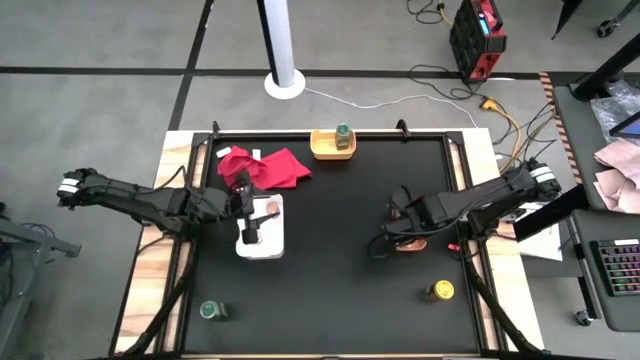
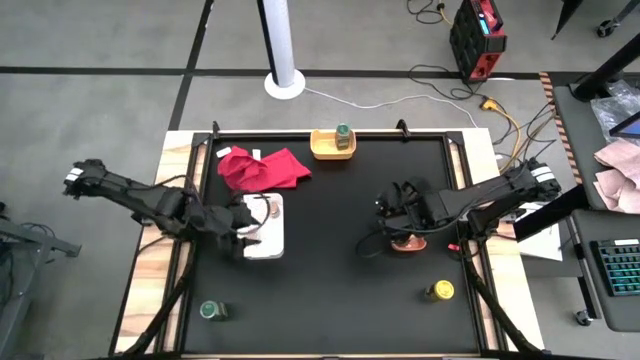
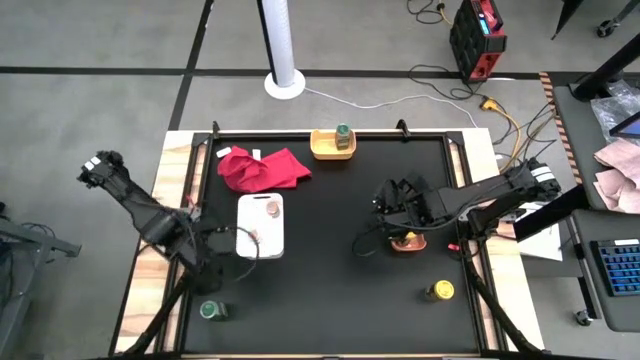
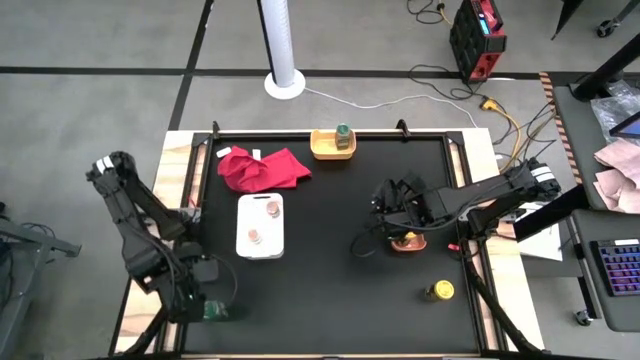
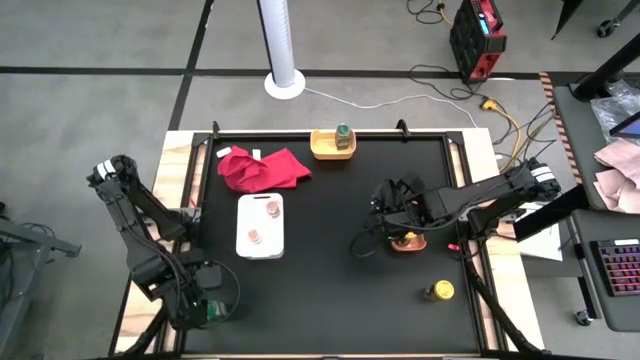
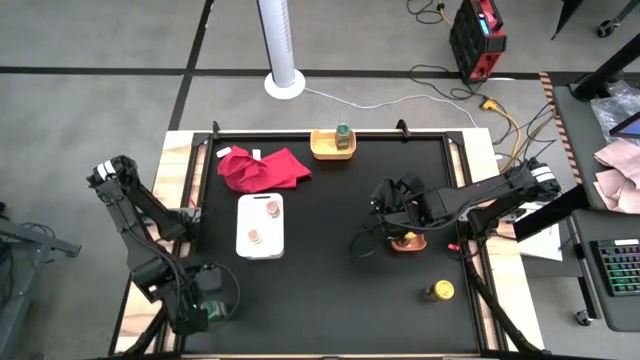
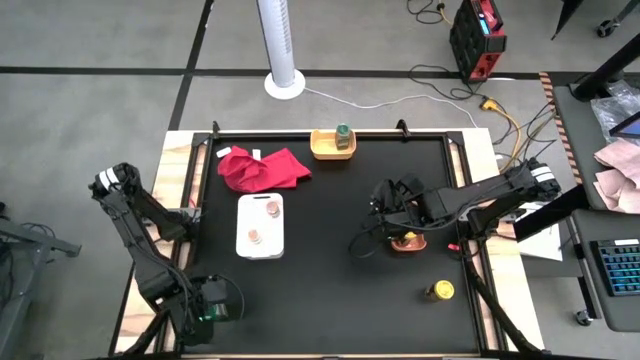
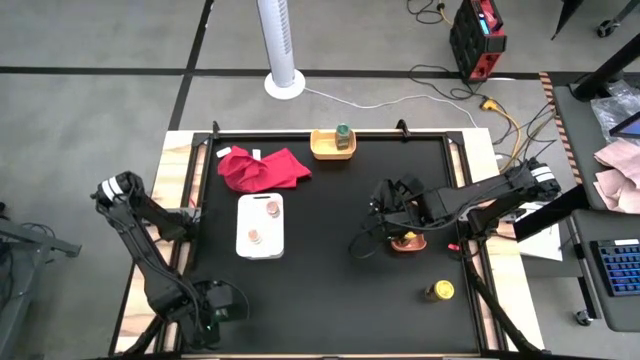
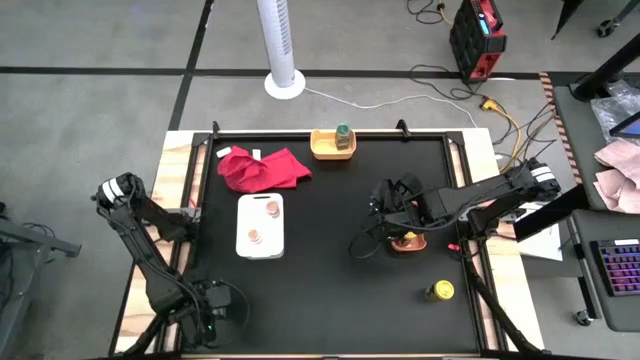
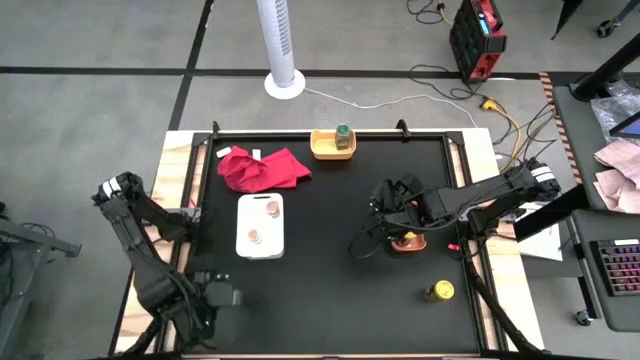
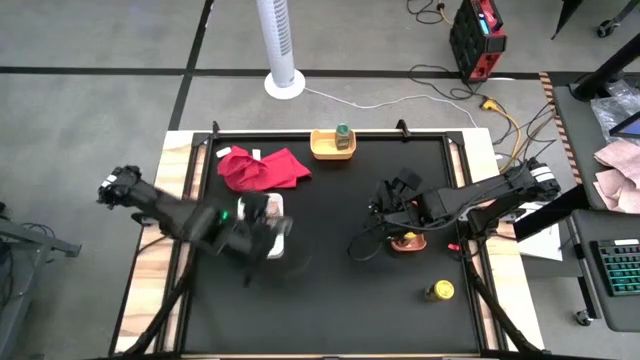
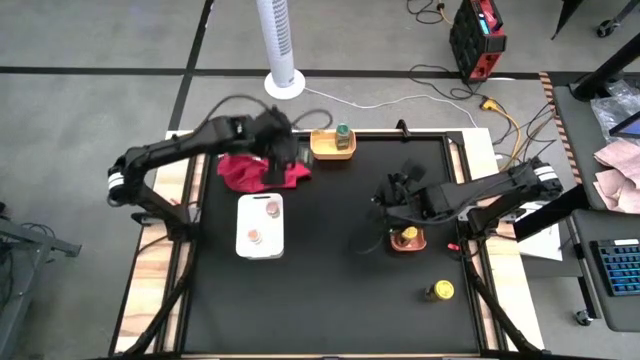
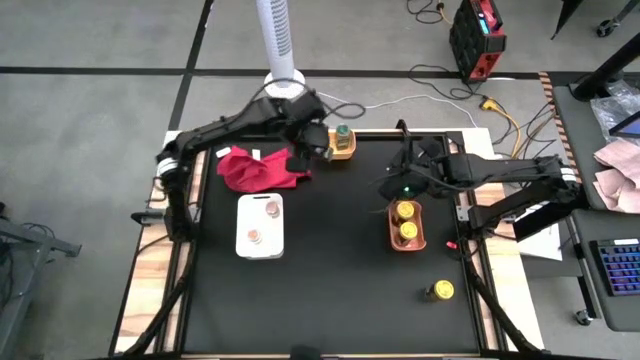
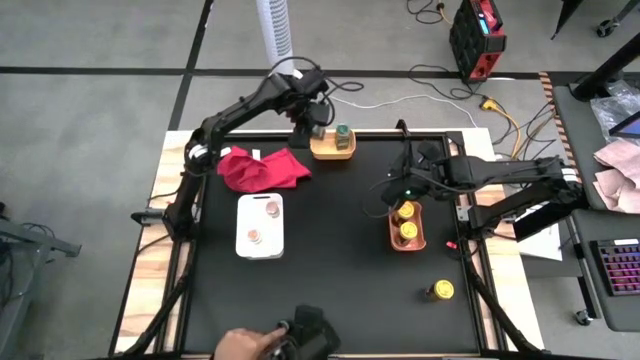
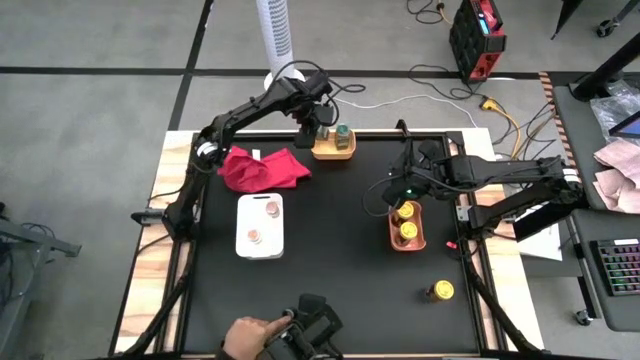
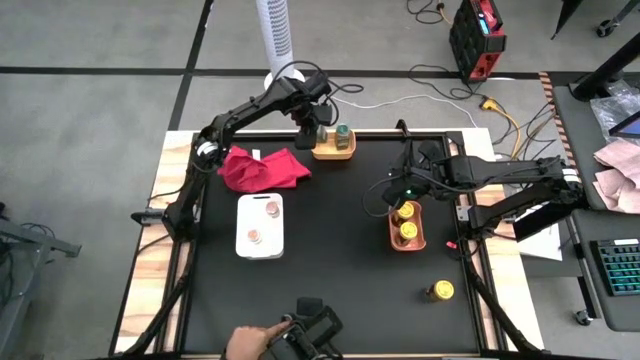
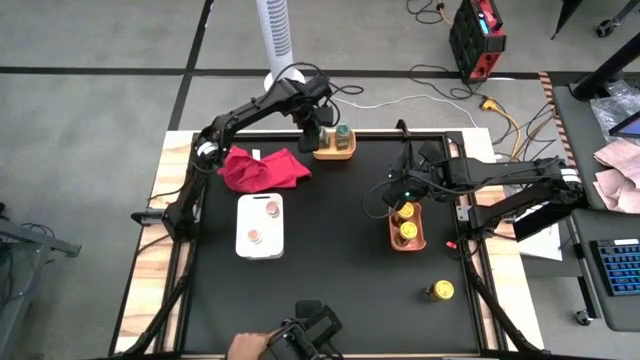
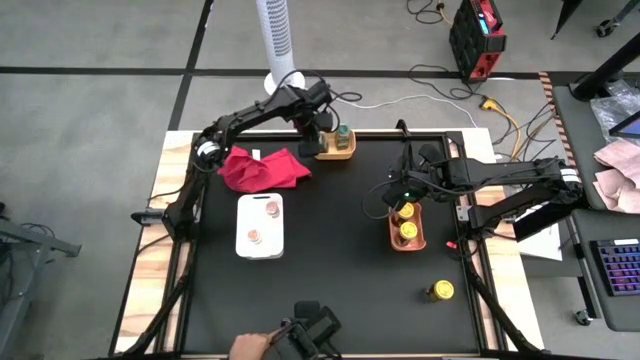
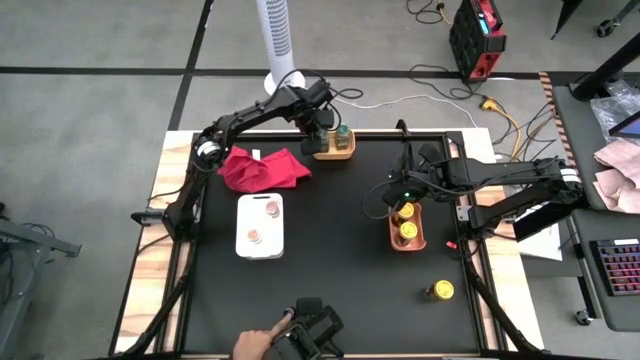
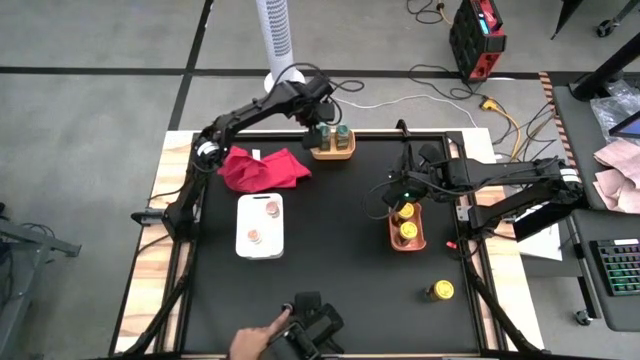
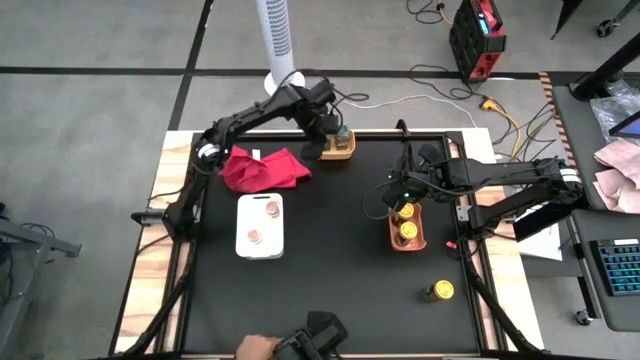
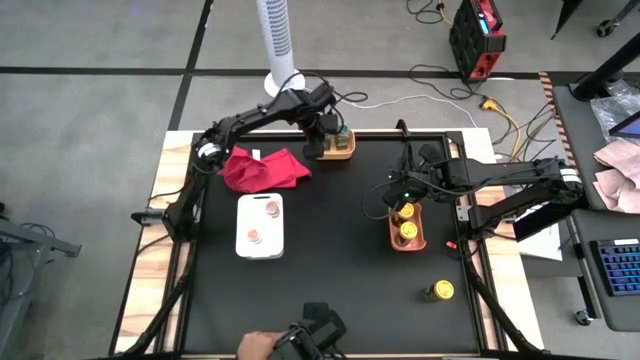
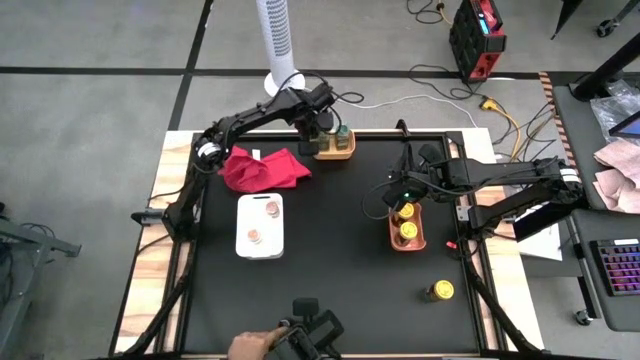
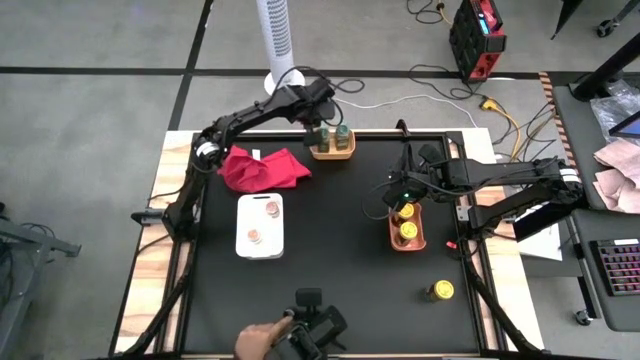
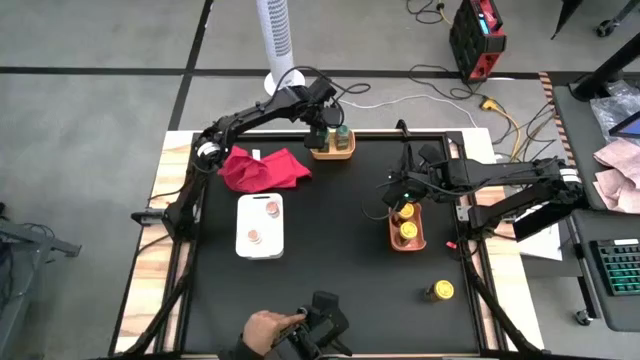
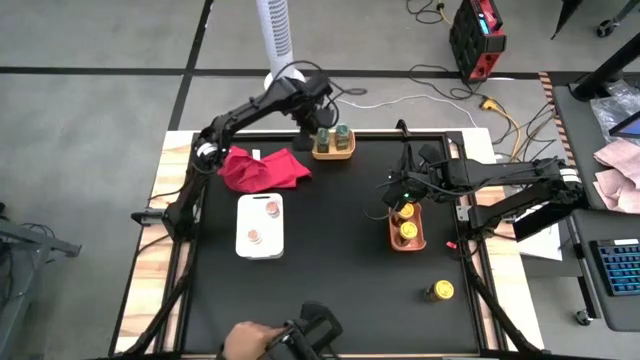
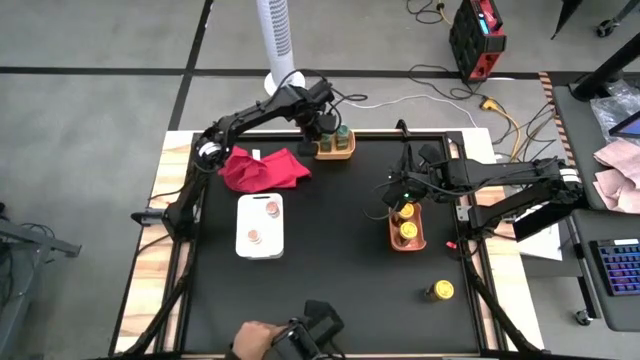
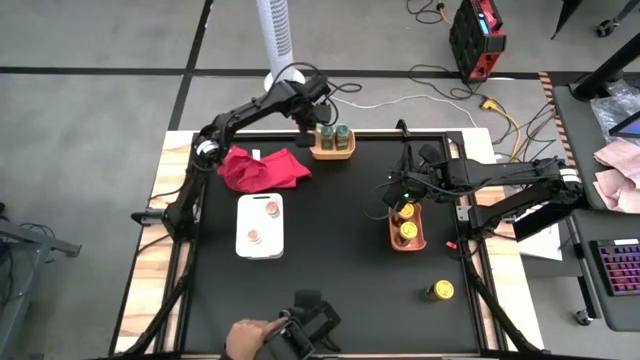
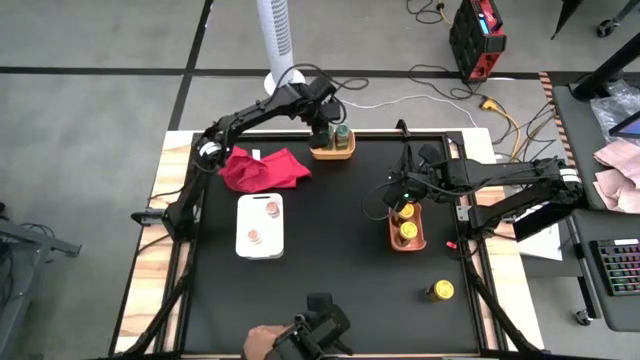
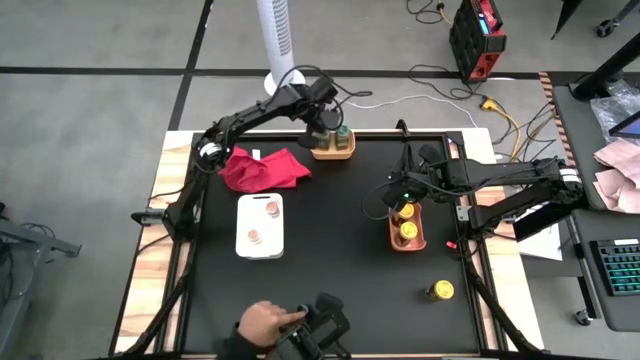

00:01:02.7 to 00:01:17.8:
Task: Sort spices by type
Put the green seasoning bottle into the yellow bin

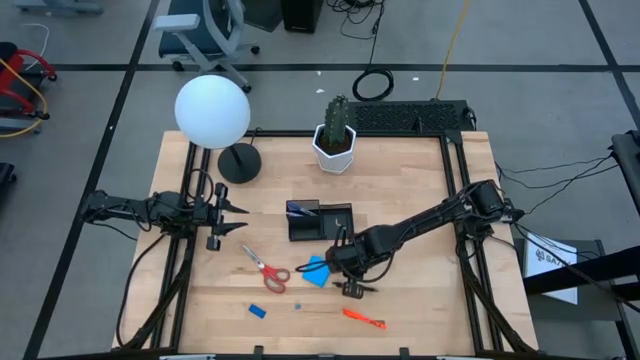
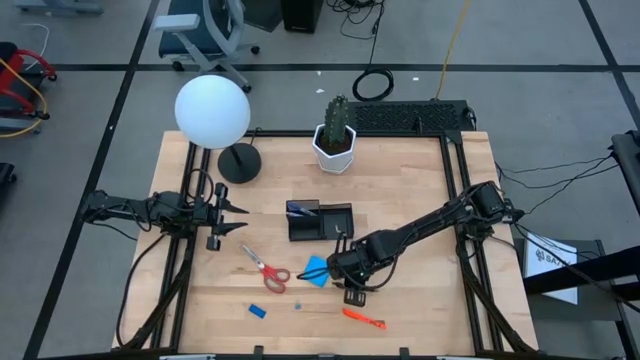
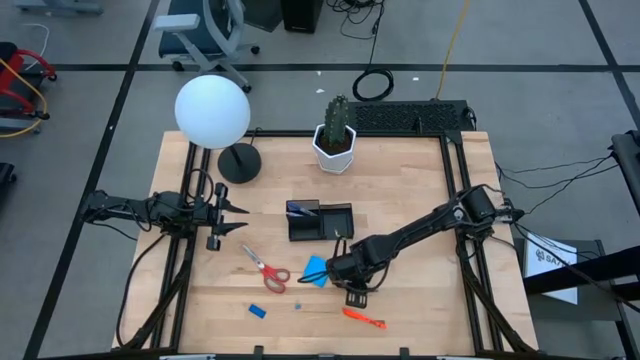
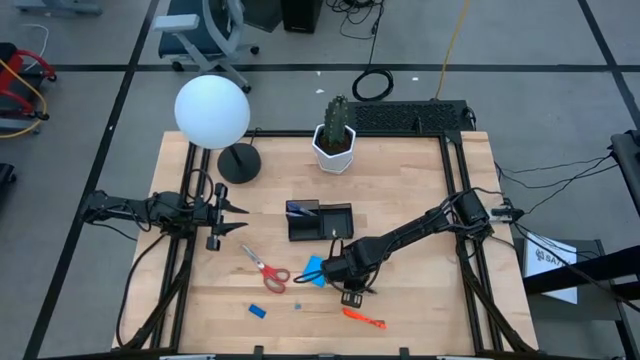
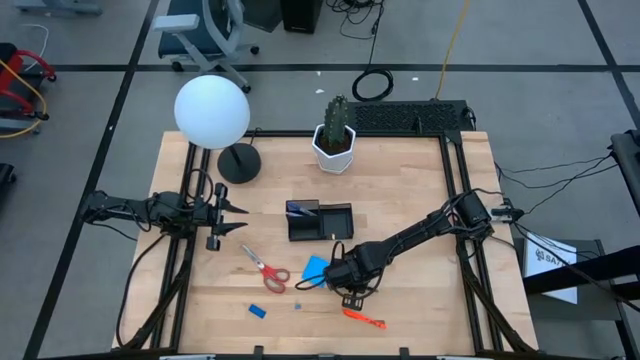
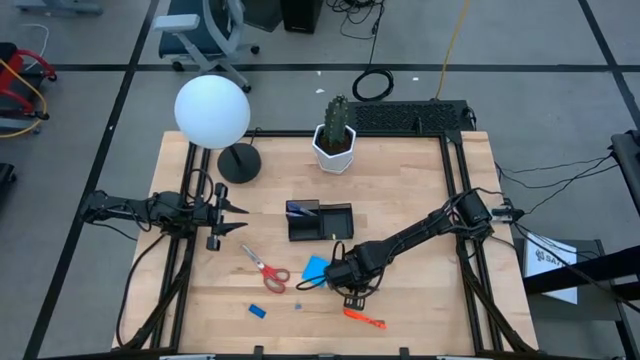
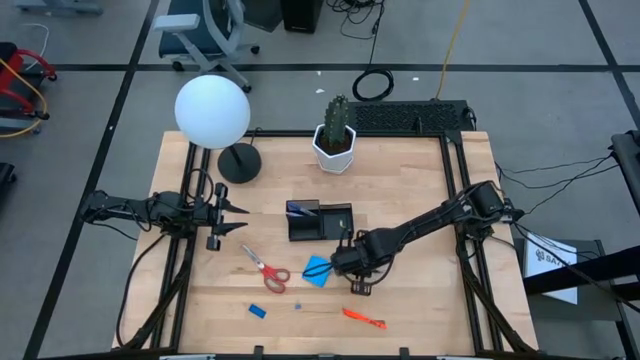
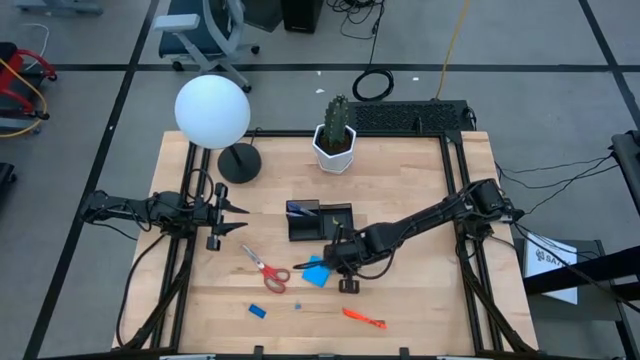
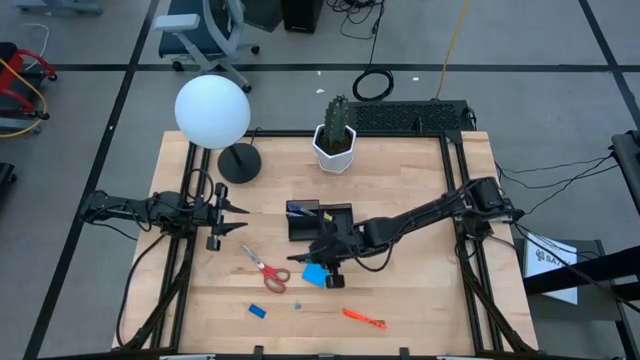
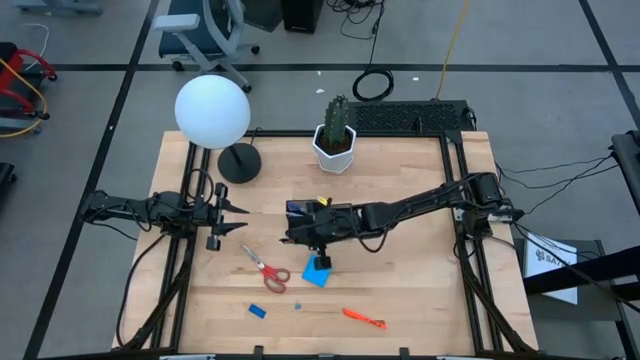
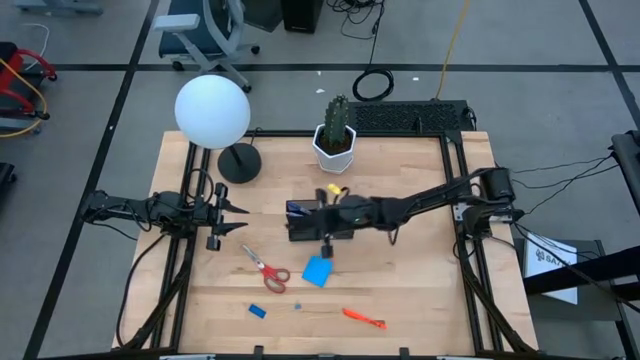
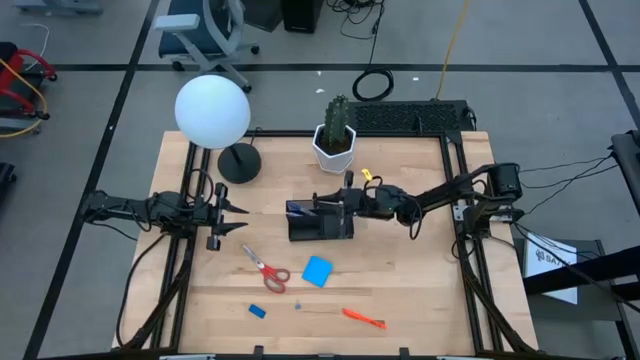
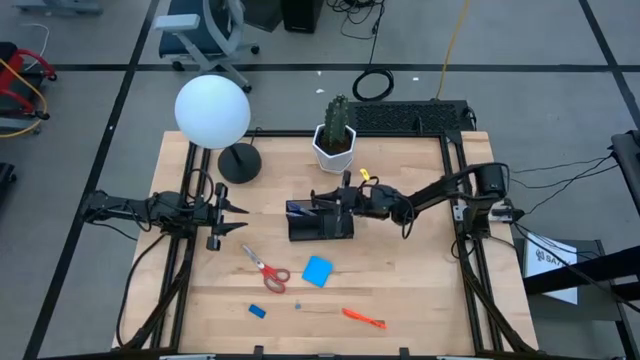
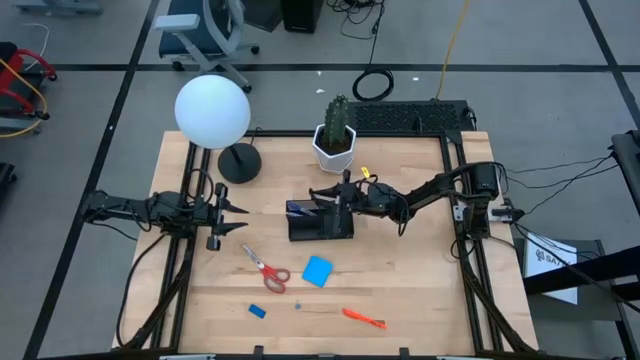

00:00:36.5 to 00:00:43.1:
Task: Pick and place office supplies into organizer
Put the black pen into the black desk organizer
